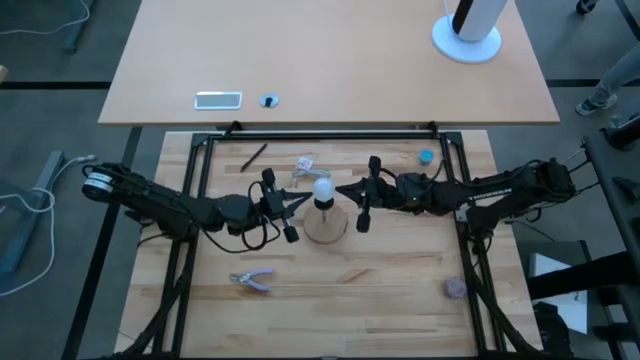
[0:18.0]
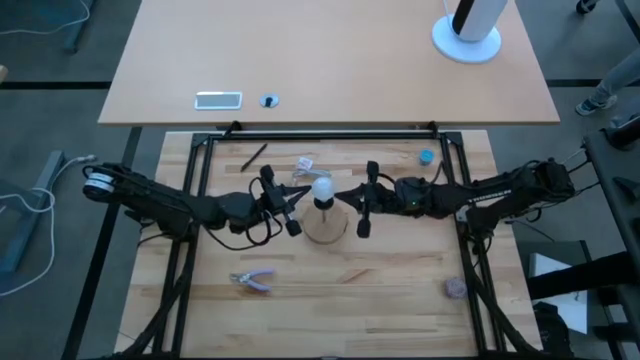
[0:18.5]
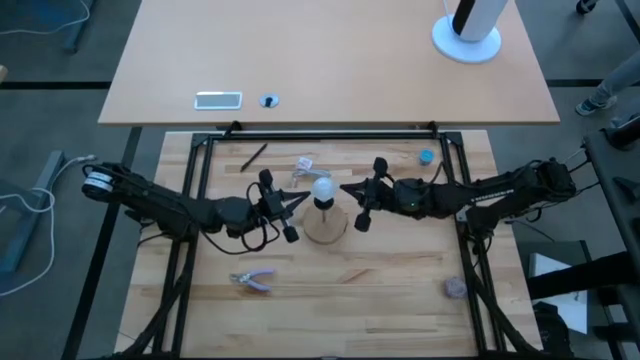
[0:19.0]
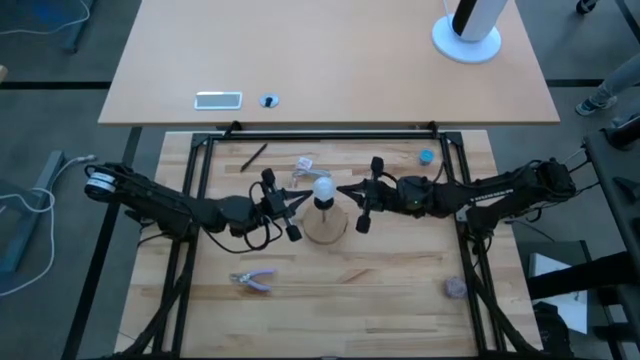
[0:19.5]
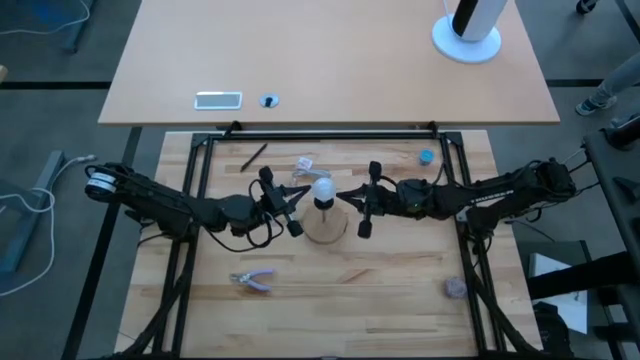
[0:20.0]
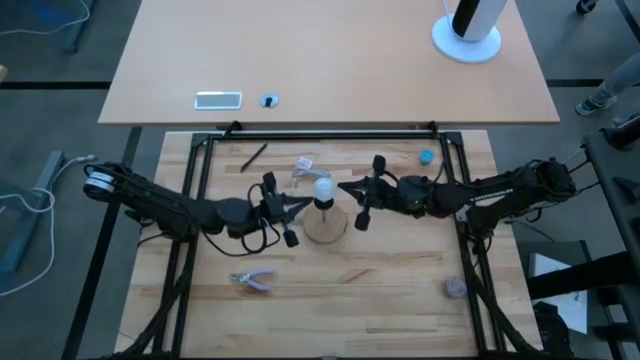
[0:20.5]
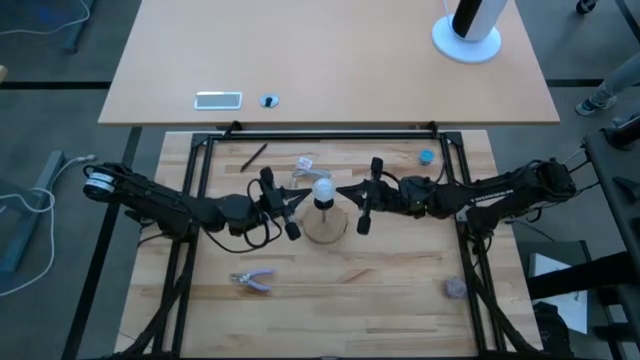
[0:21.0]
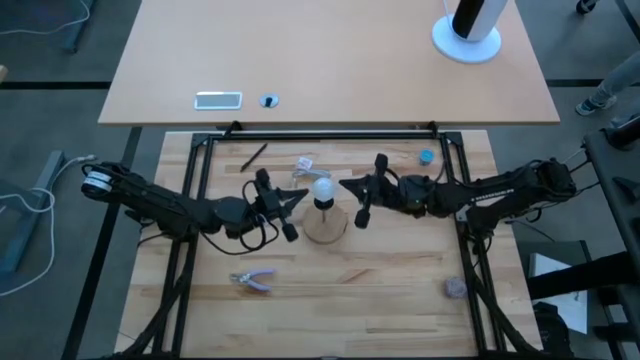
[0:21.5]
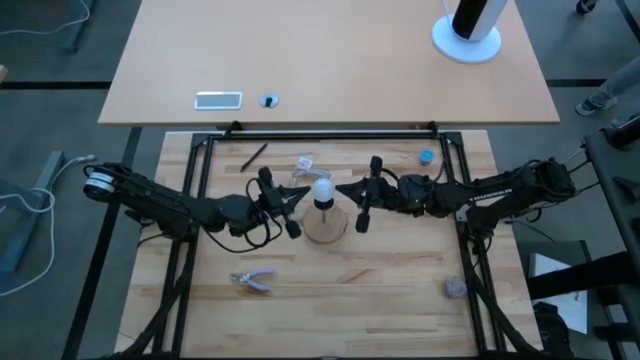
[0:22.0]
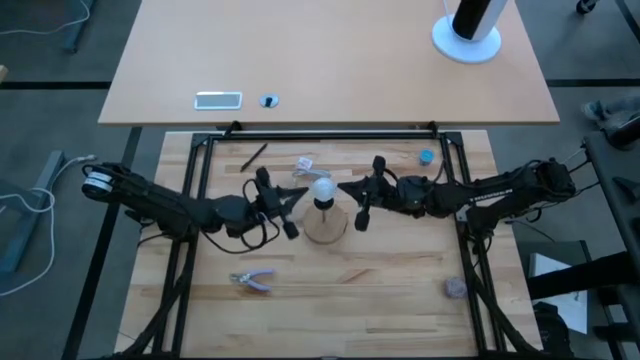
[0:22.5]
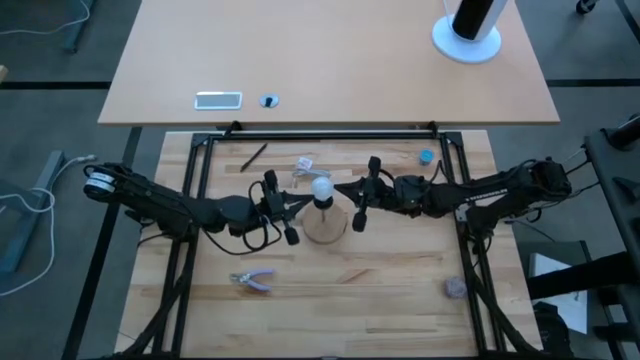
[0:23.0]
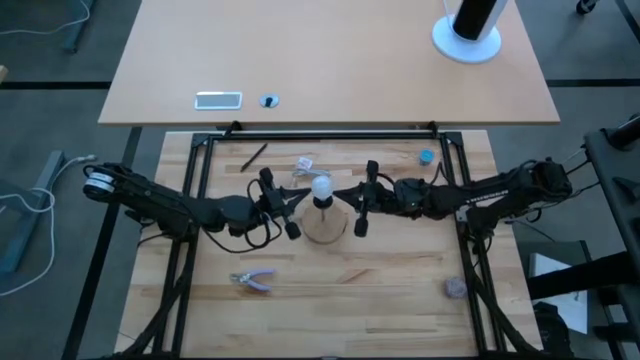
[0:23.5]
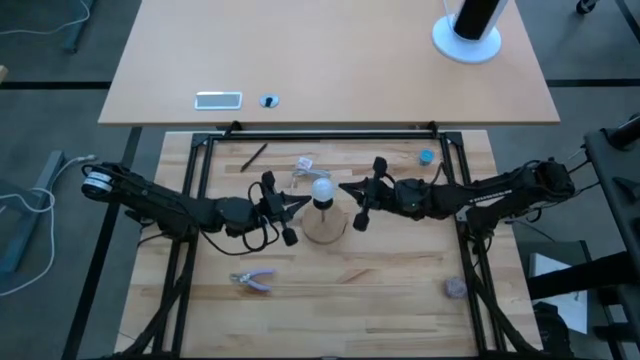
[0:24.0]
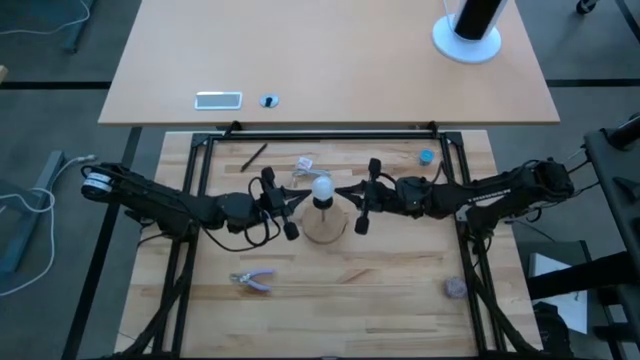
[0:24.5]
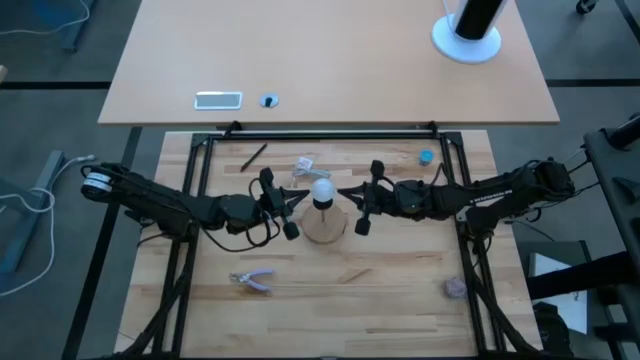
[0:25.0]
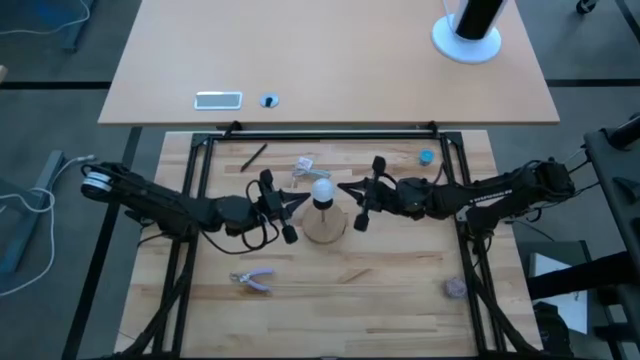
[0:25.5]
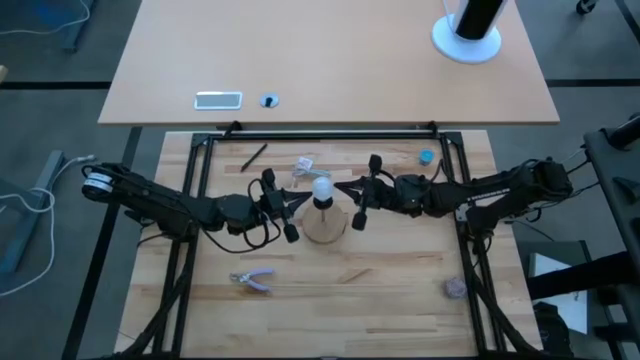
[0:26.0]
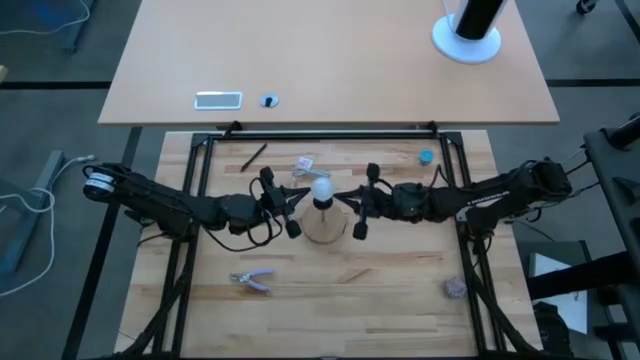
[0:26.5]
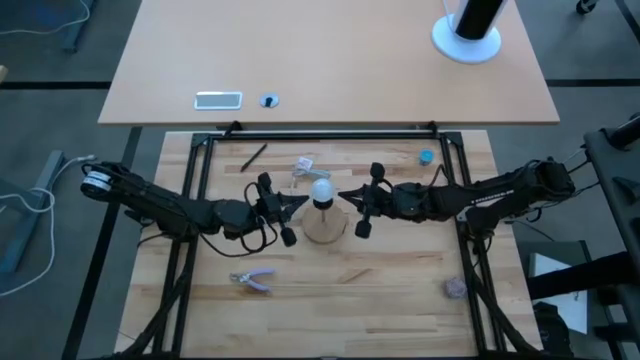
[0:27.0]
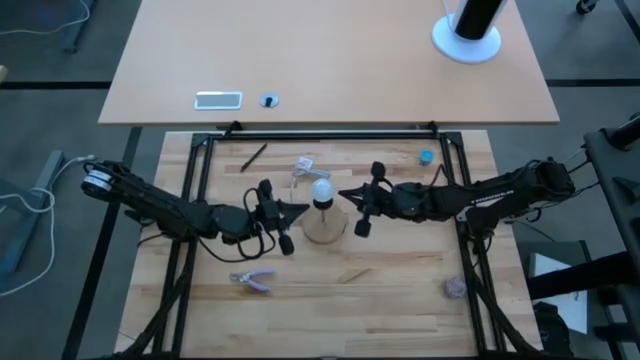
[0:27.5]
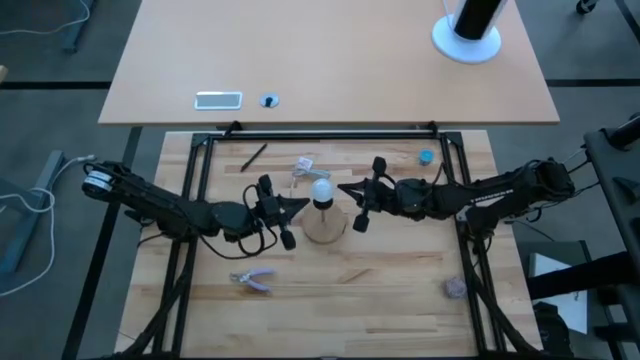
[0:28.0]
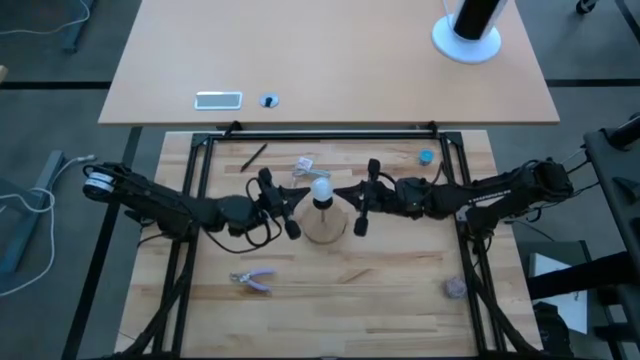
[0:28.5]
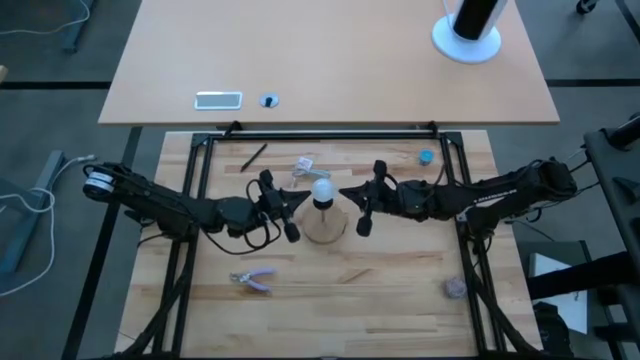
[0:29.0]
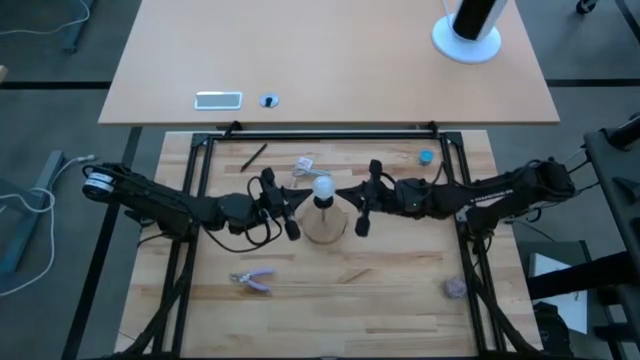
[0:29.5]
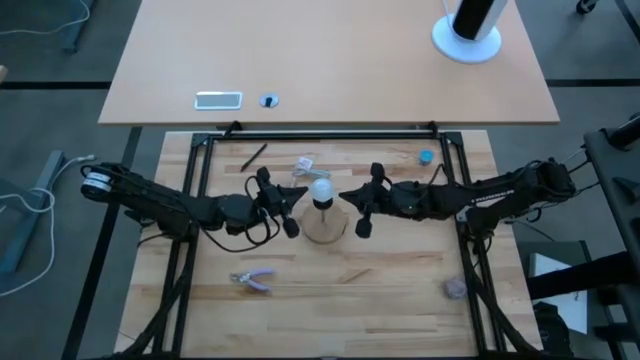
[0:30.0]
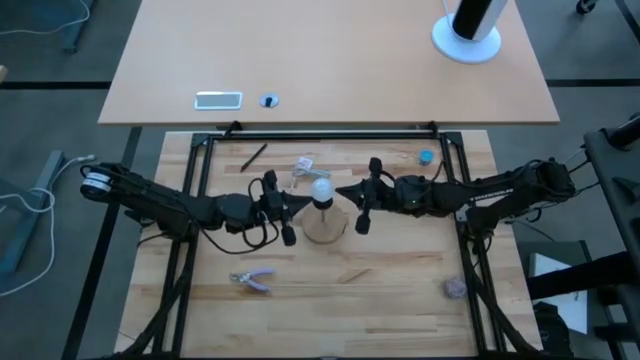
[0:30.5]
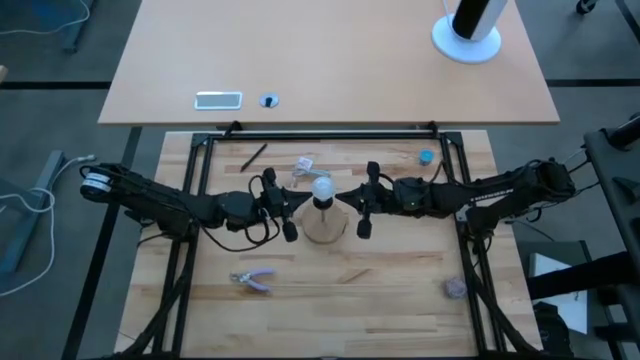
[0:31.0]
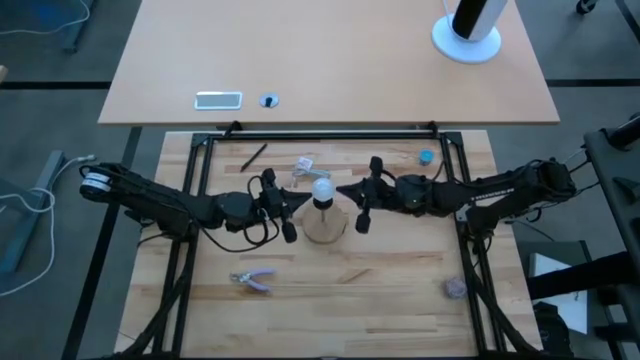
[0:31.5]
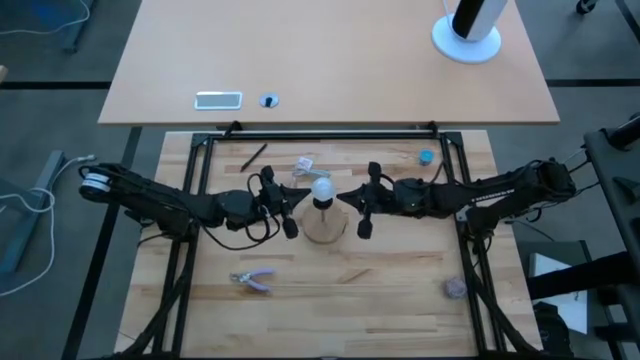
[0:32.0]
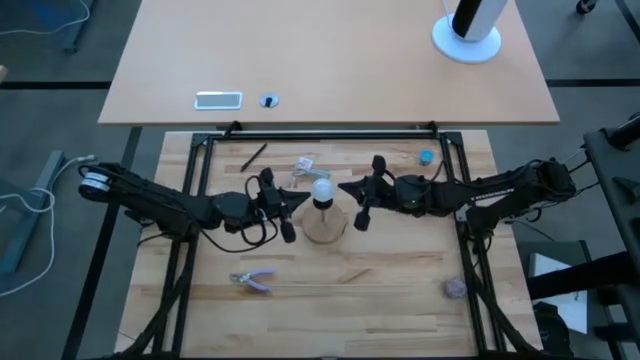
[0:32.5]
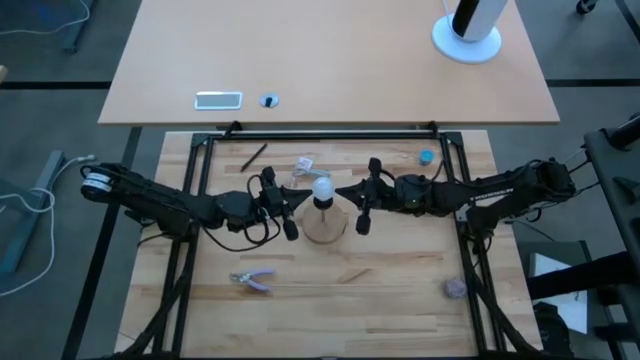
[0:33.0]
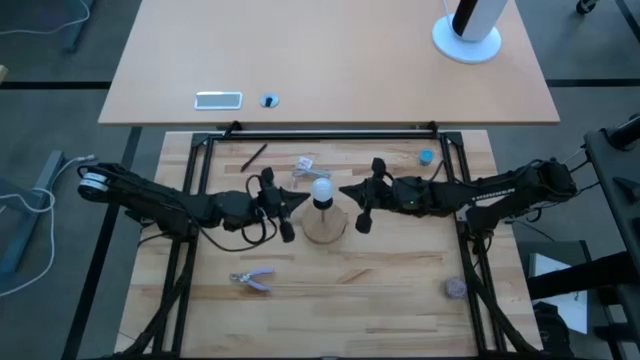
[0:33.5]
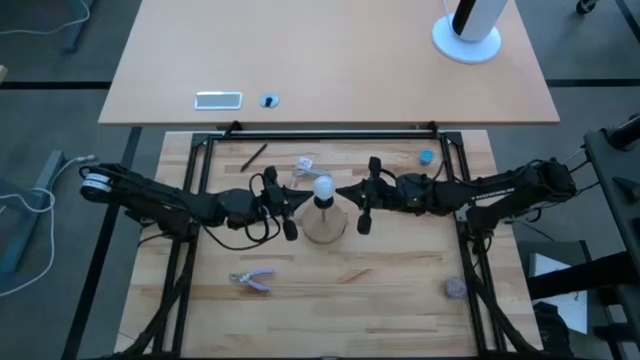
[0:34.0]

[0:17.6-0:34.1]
Task: Screw lightbulb
Insert the lightbulb into the lamp

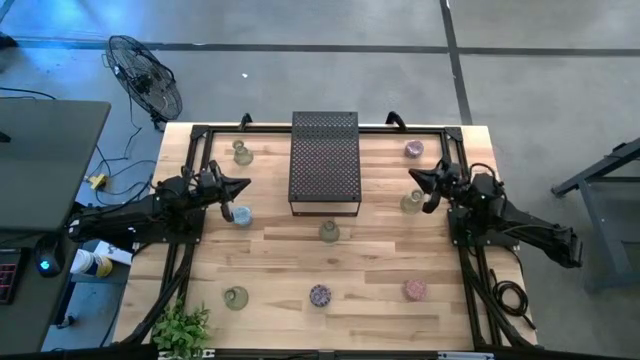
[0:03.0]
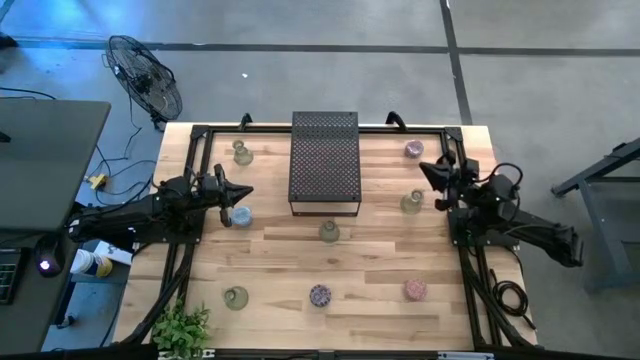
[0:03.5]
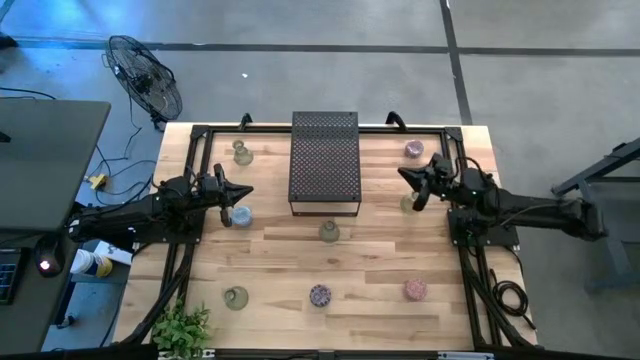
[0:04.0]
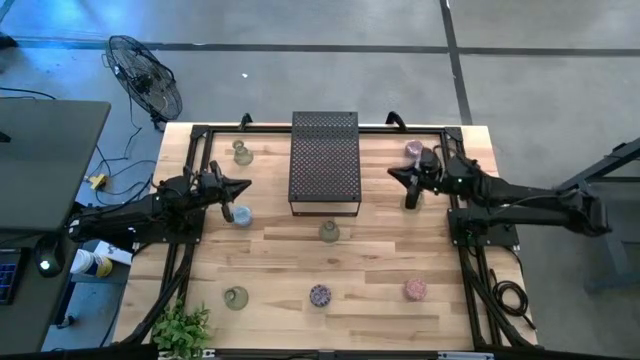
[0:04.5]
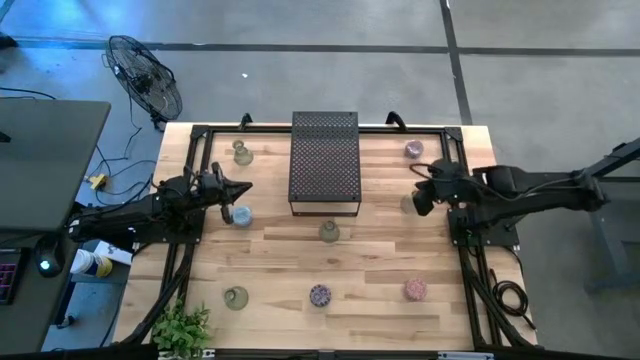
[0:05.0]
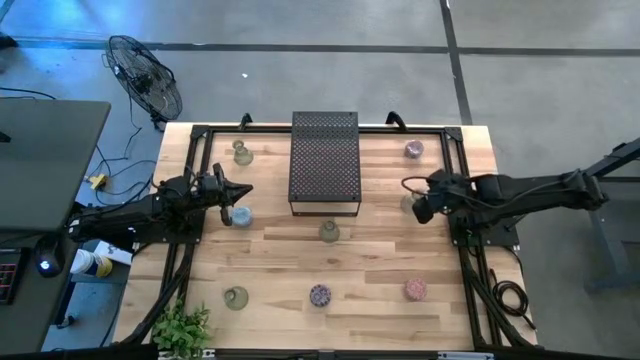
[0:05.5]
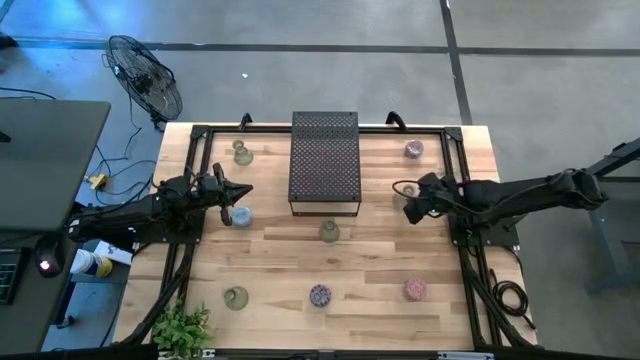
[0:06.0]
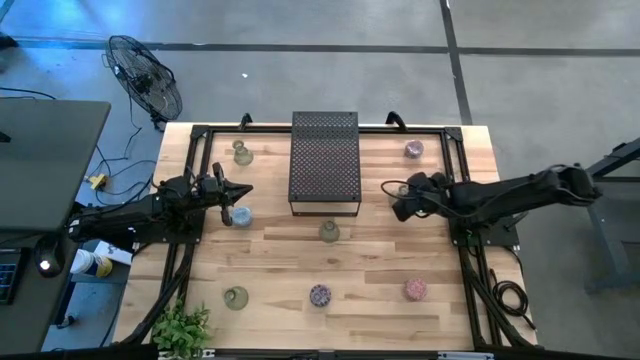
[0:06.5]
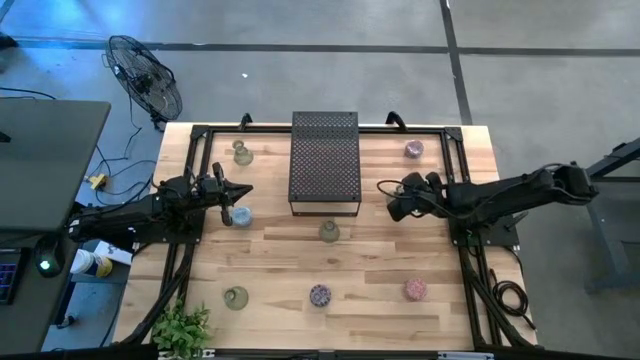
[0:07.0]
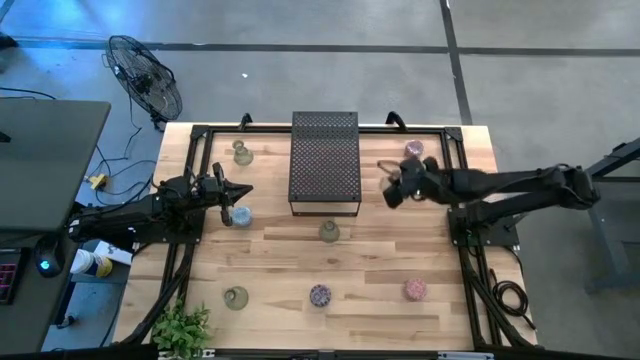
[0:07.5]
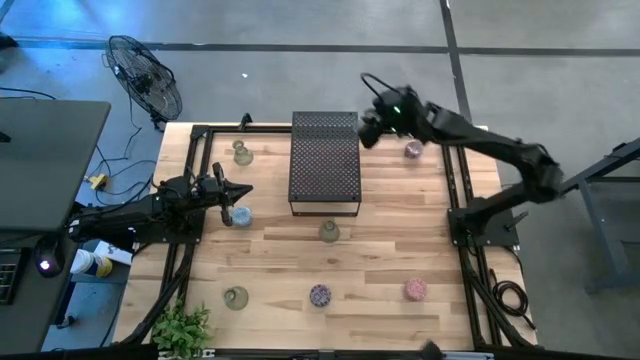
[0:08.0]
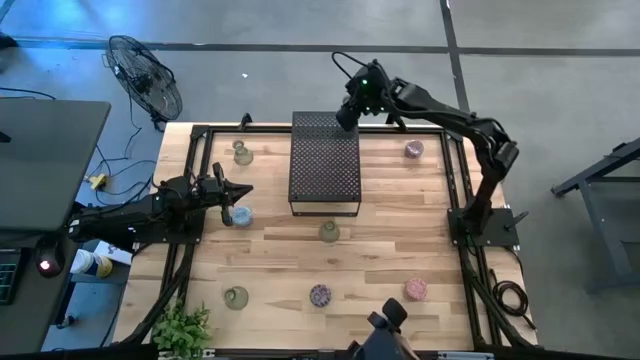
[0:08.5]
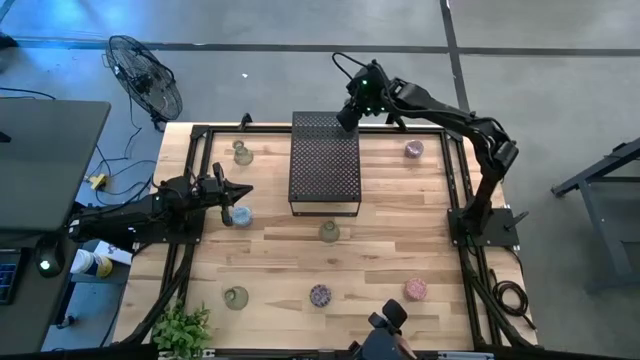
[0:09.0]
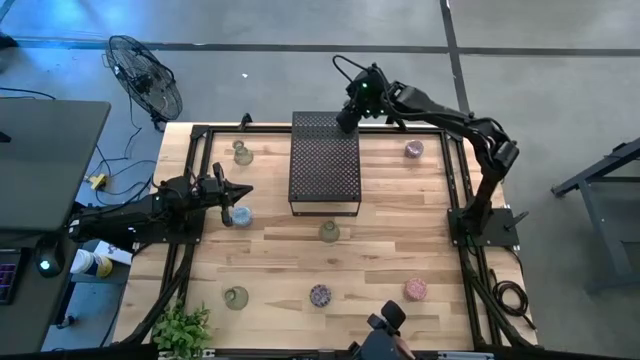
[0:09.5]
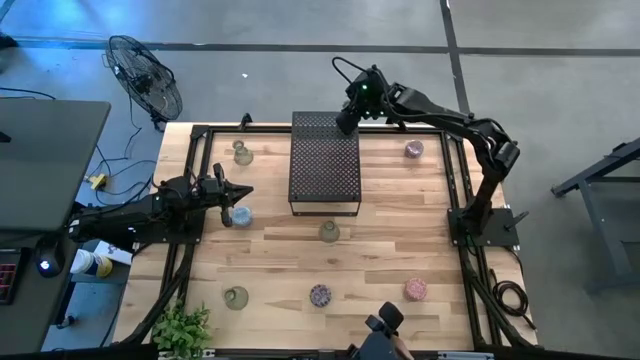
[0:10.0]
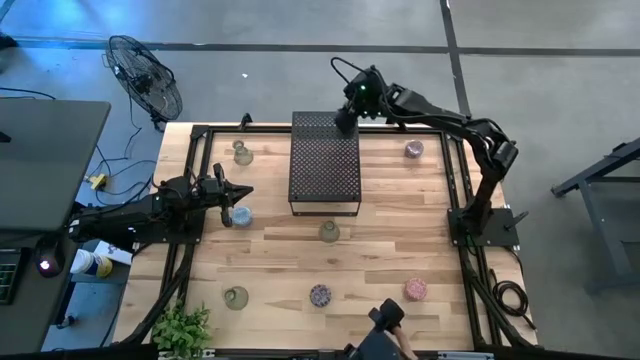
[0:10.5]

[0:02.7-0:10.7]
Task: Pick & Place candle stick holders
Put the green glass candle holder on the of the shelf
